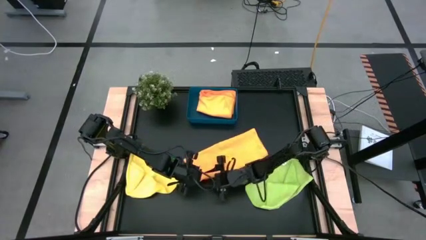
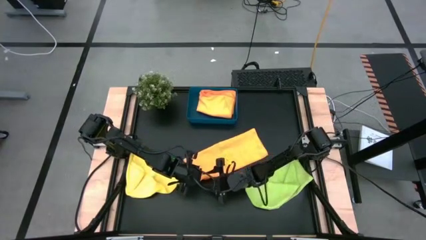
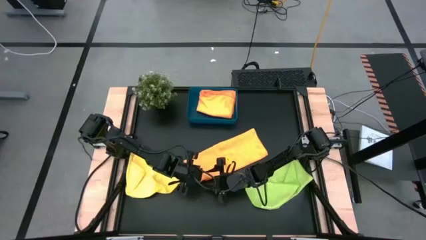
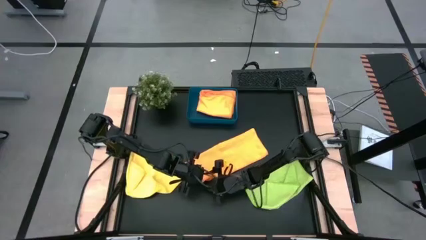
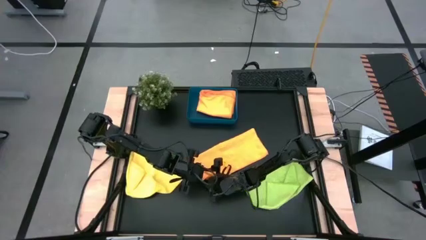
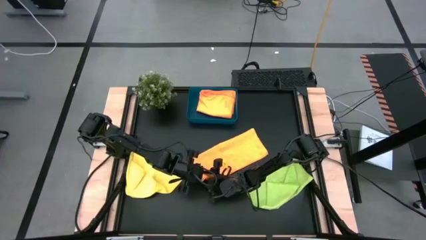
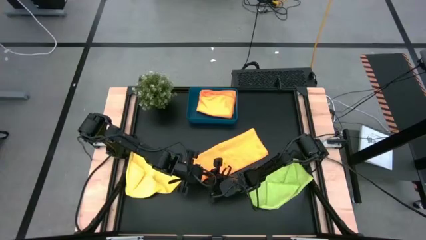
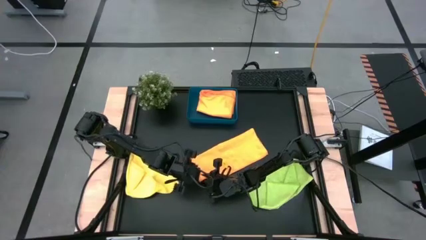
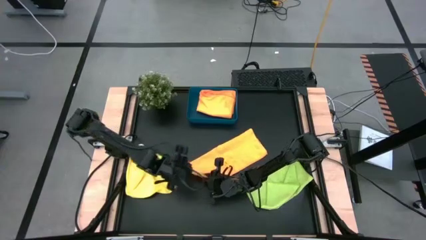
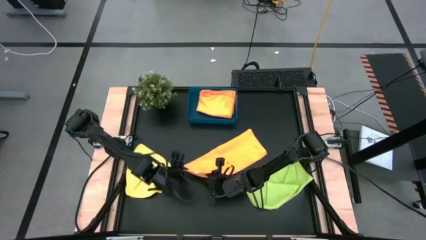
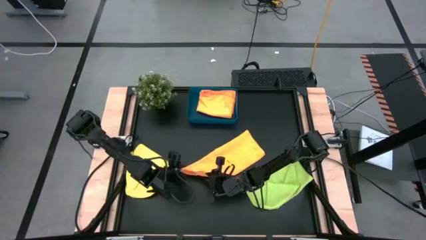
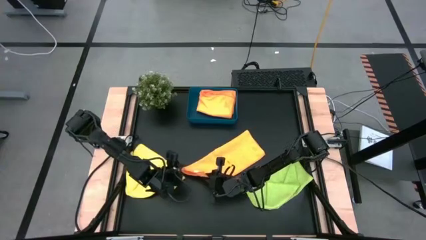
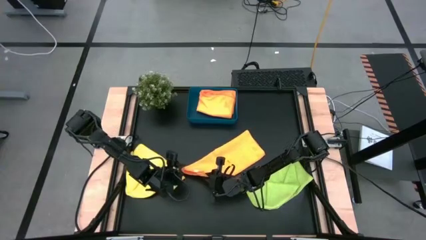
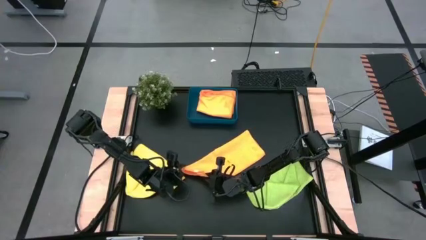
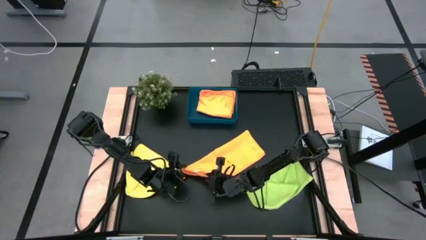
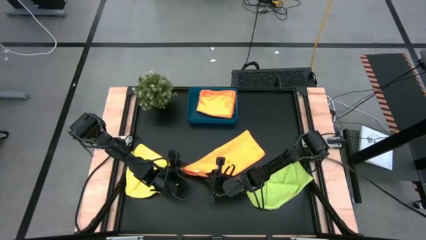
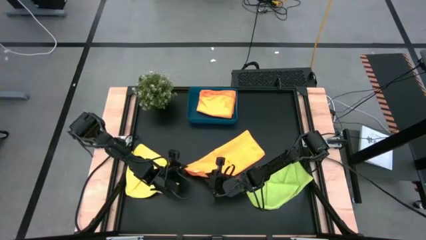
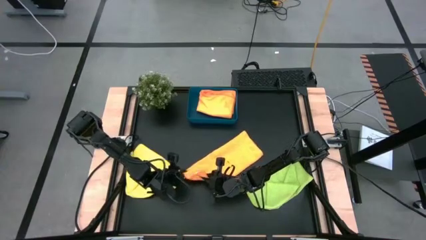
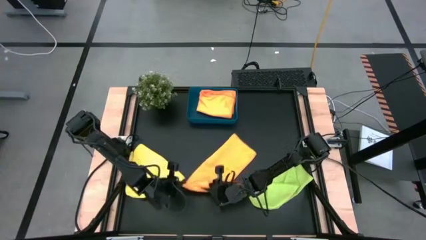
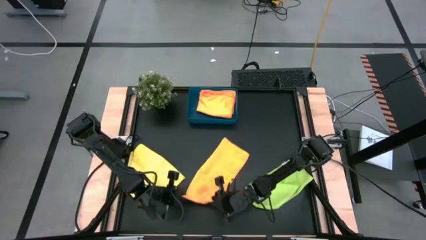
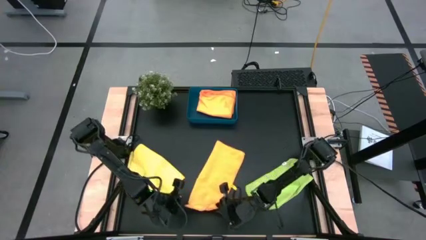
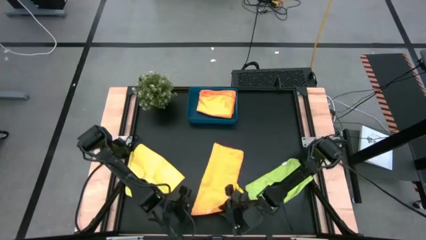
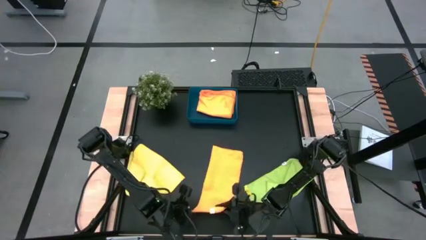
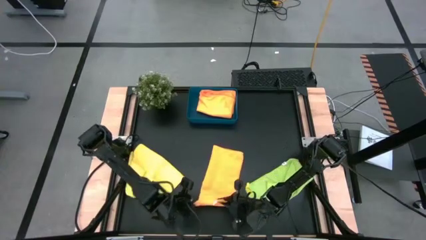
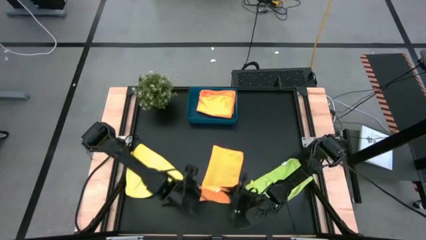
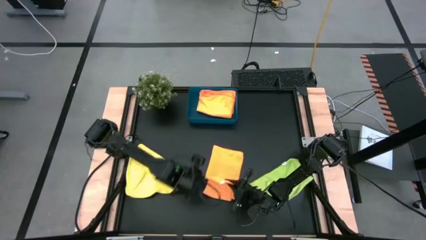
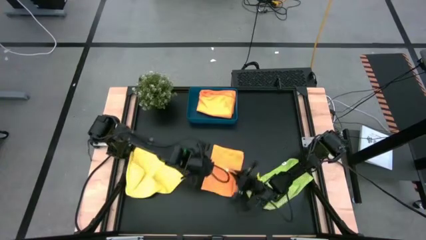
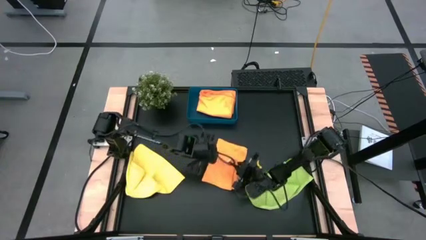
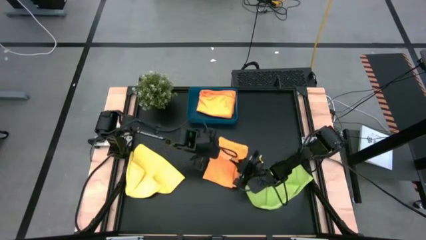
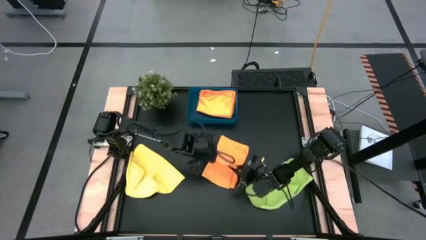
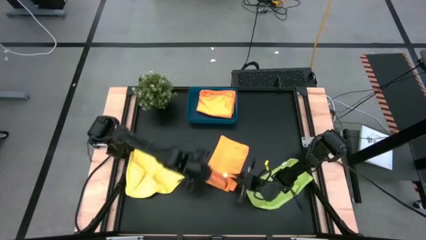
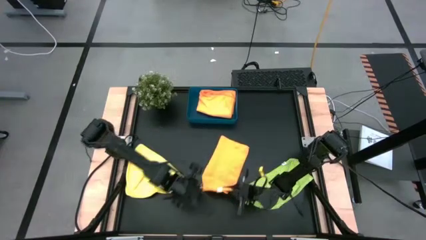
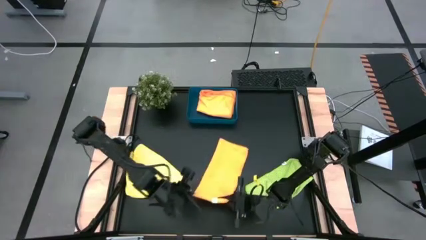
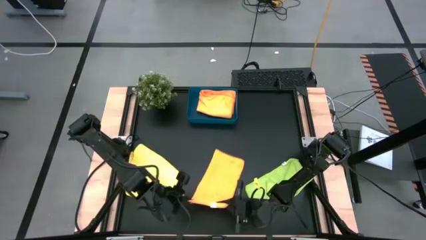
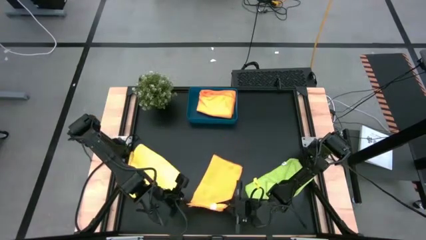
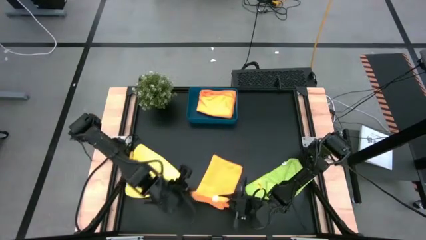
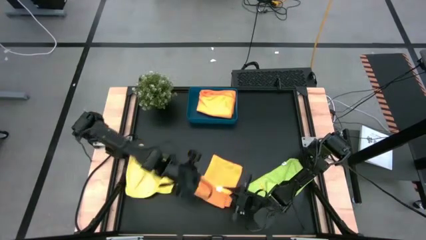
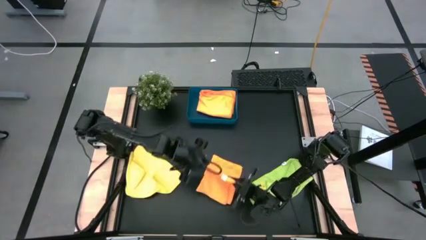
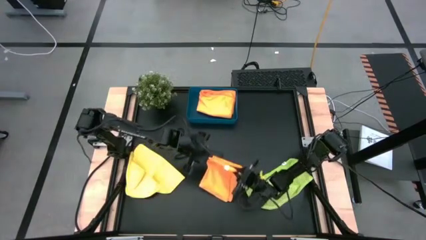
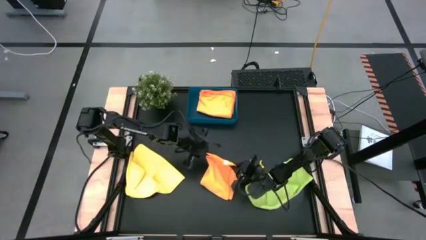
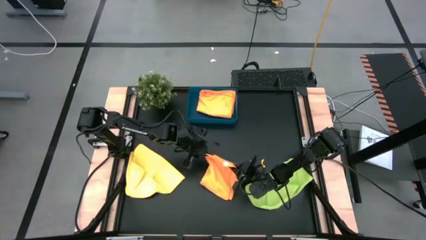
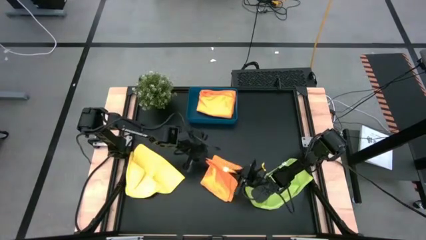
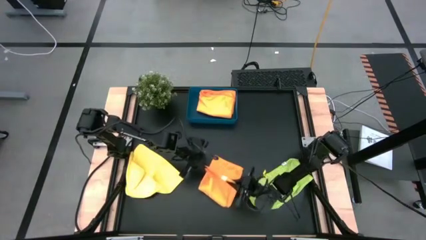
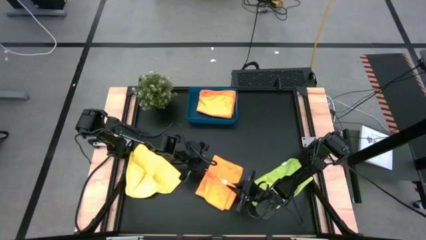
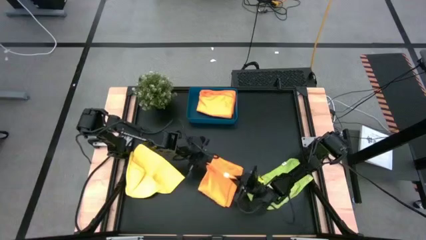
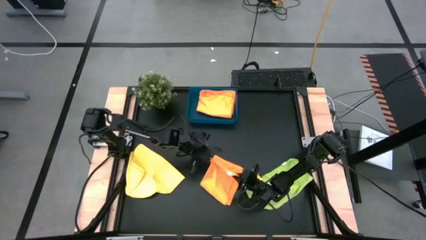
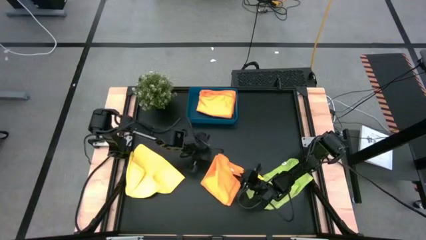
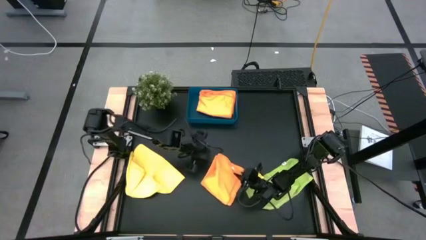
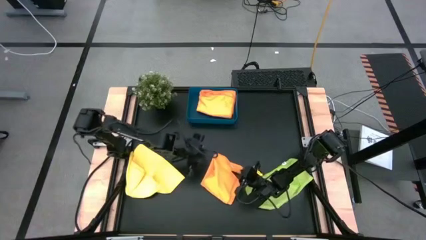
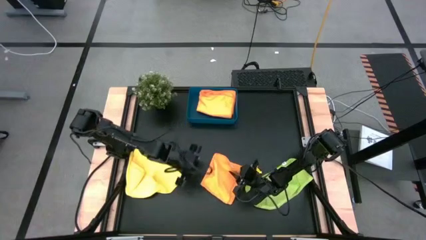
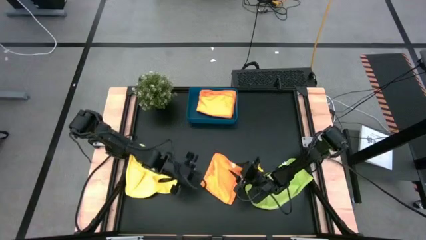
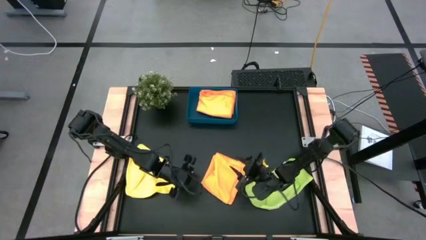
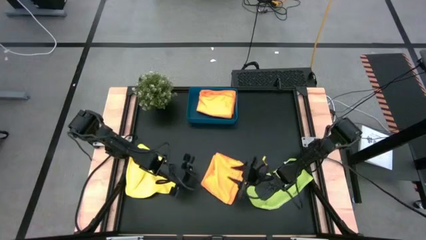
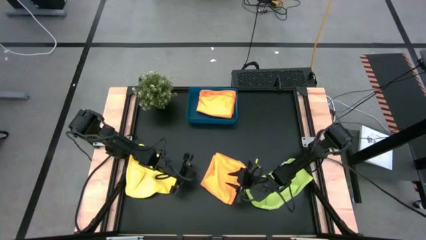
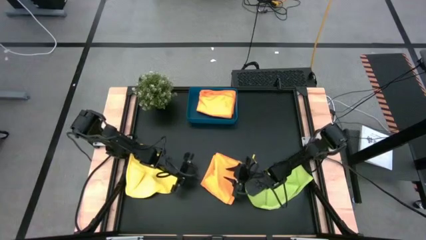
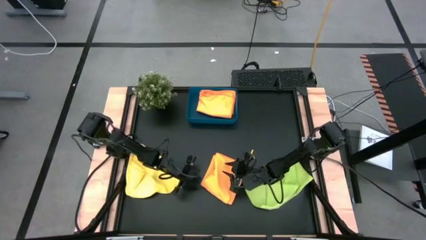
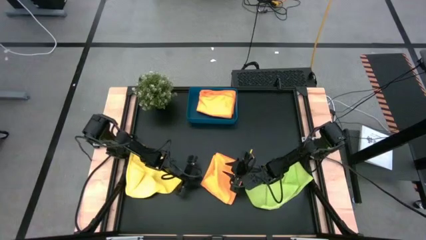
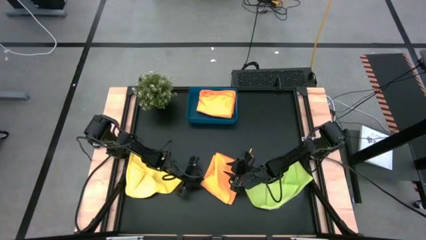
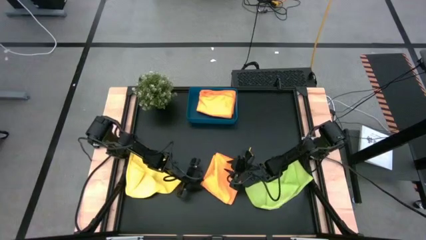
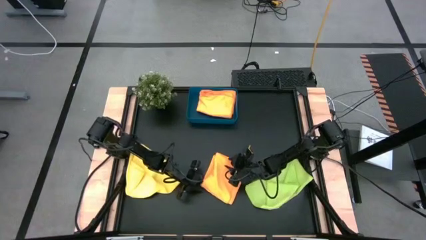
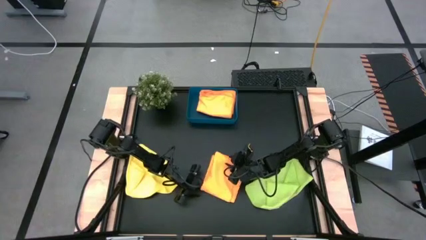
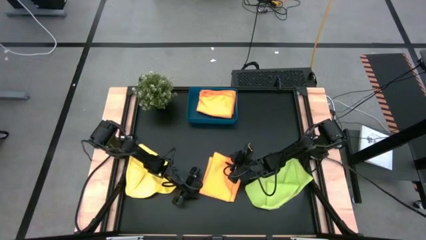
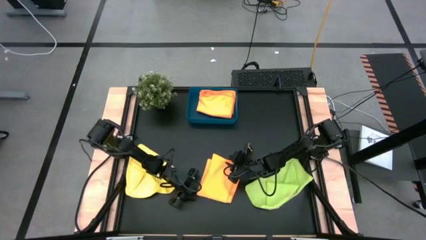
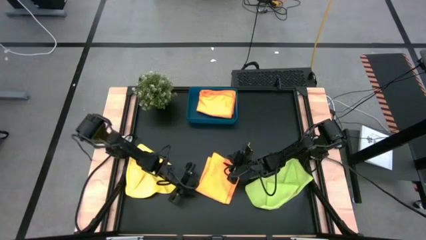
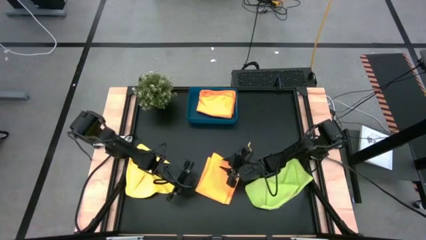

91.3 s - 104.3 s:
Task: Fold microfiber towels
Fold the orange microfiber towel

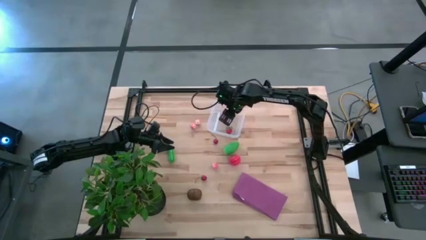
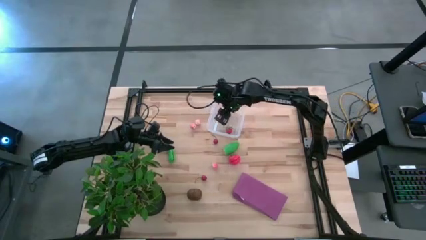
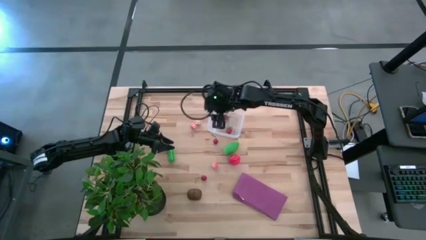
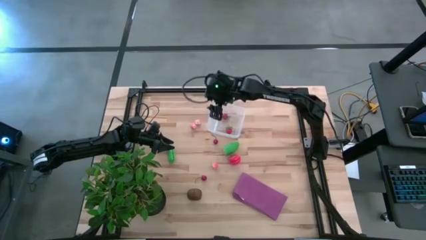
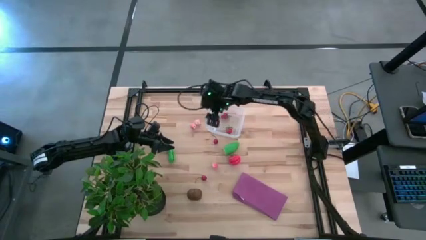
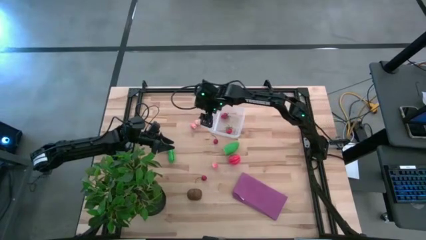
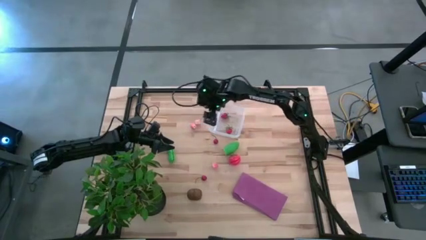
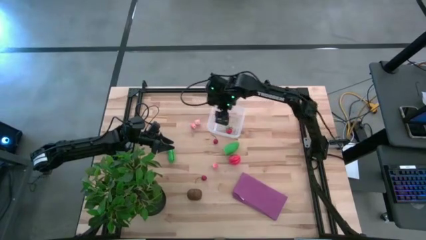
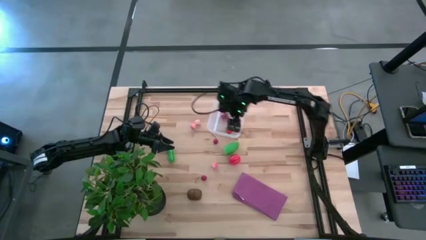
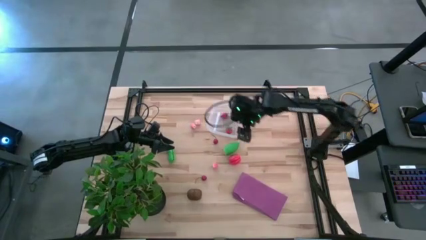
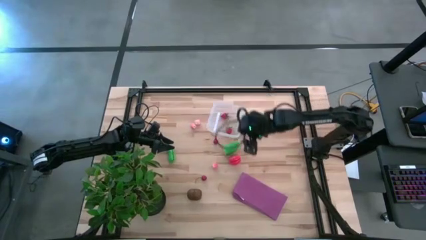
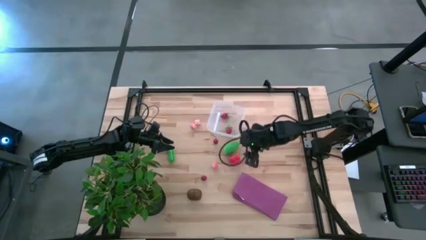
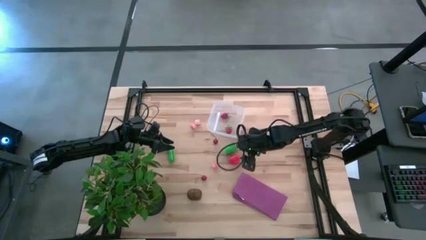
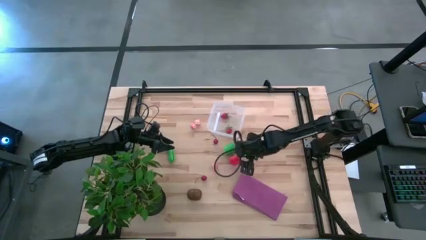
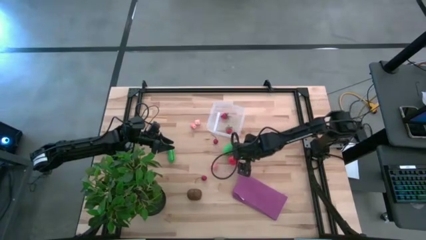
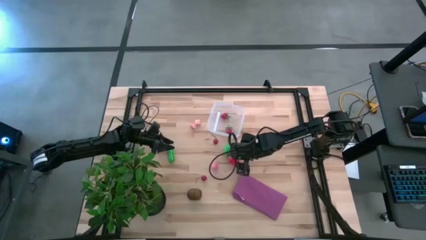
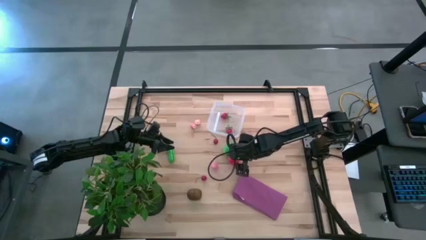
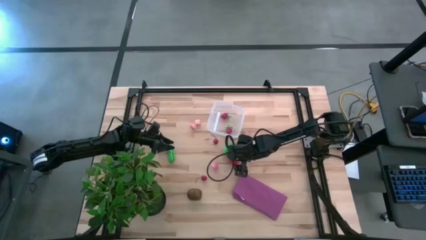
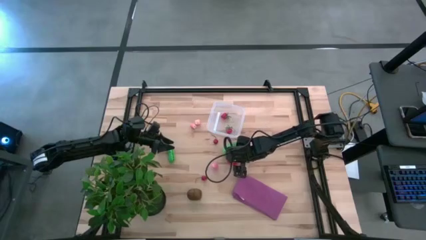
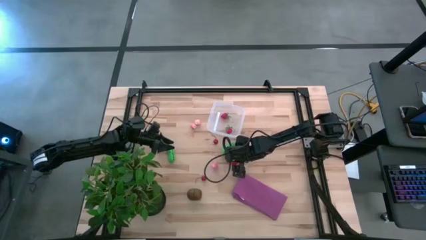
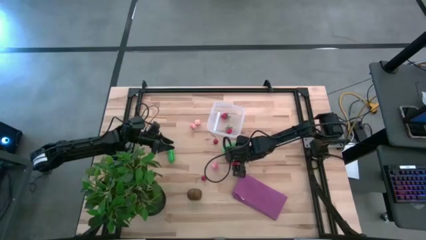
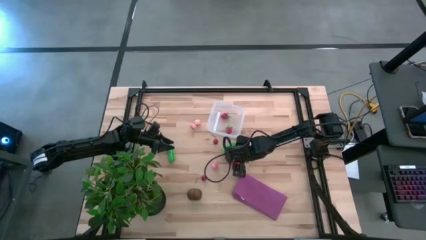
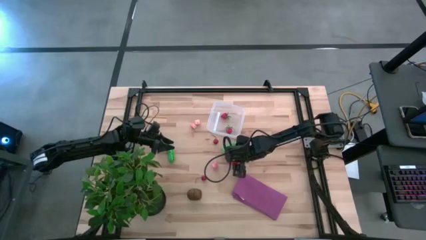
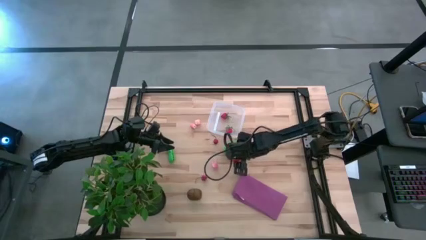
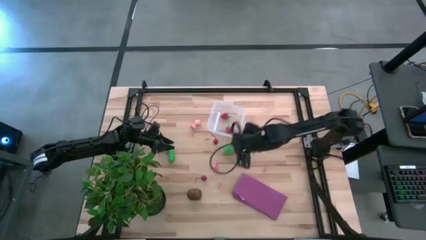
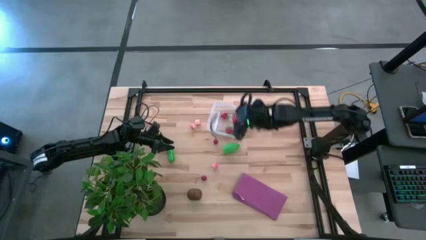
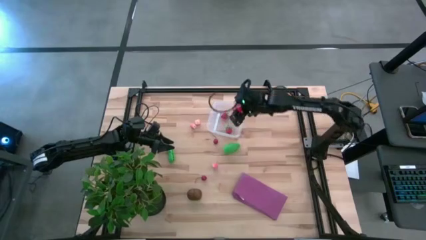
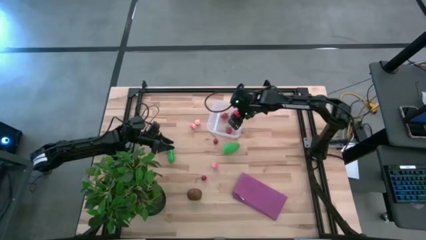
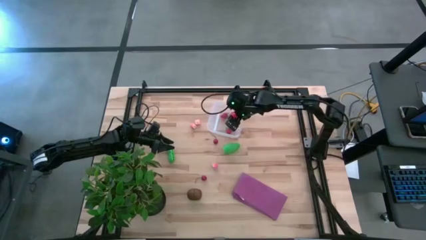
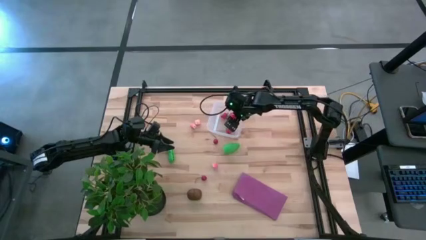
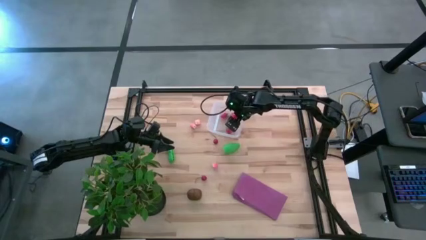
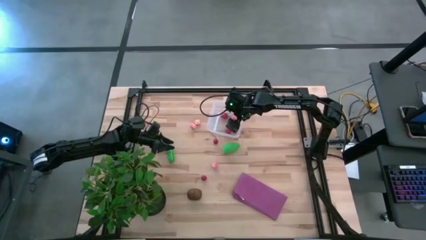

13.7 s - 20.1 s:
Task: Pick and placing Produce into tupperware
Put the red tomato in the transparent bin
